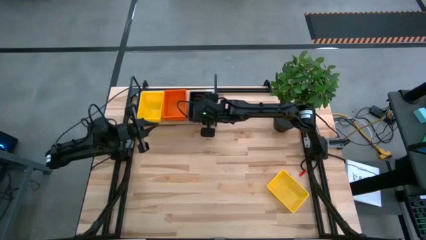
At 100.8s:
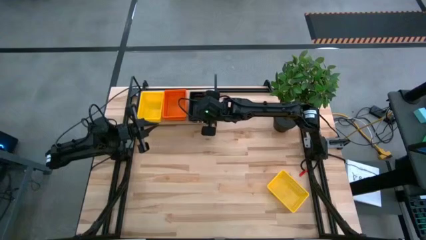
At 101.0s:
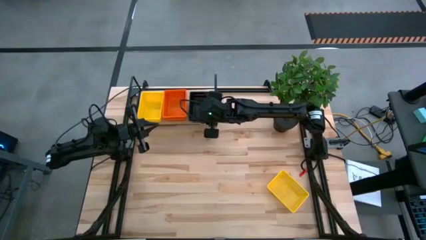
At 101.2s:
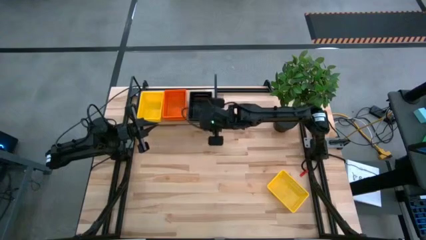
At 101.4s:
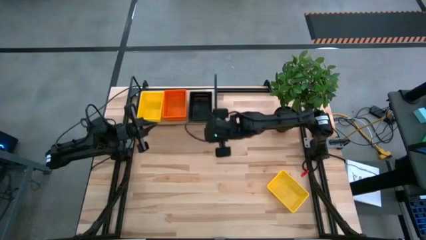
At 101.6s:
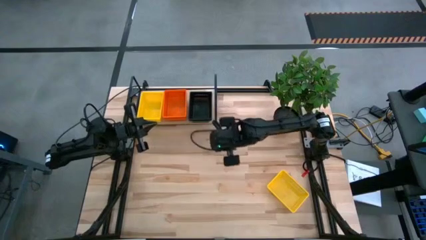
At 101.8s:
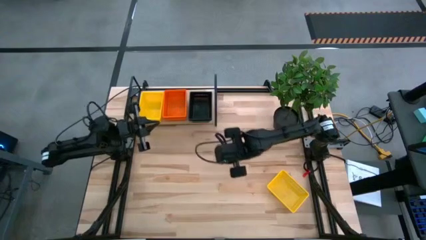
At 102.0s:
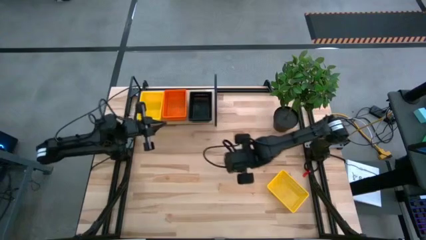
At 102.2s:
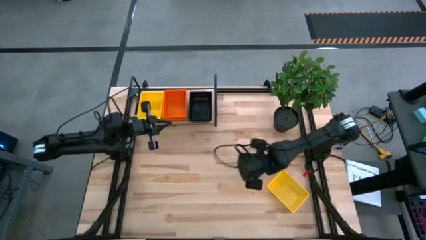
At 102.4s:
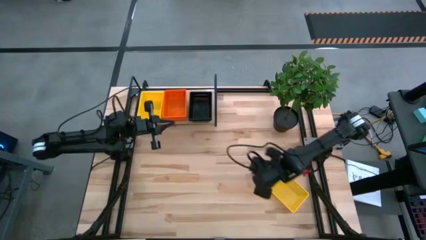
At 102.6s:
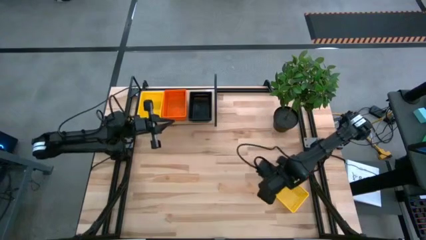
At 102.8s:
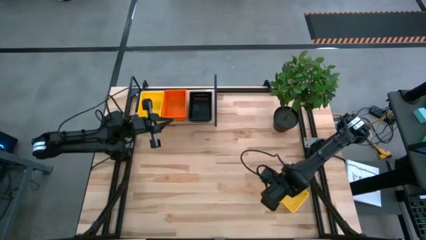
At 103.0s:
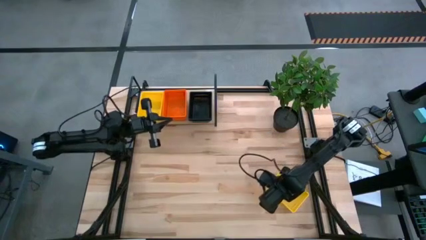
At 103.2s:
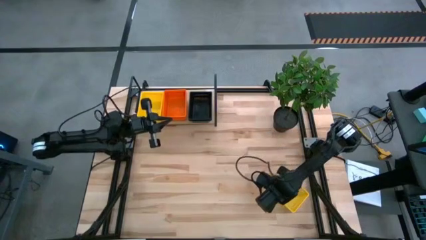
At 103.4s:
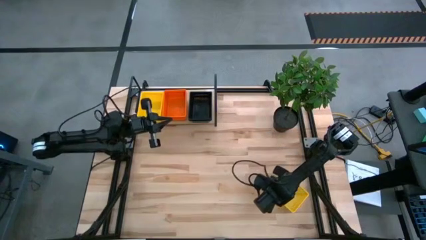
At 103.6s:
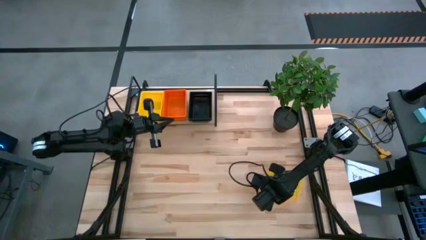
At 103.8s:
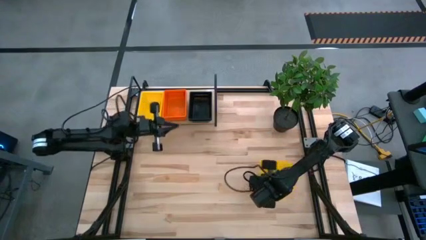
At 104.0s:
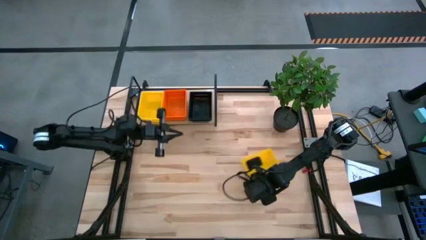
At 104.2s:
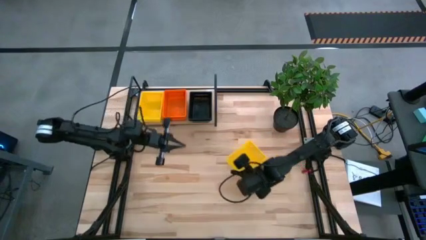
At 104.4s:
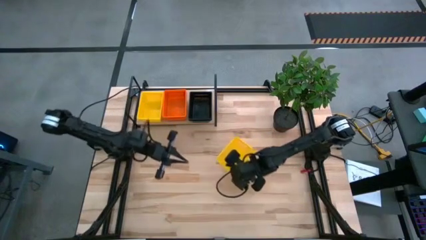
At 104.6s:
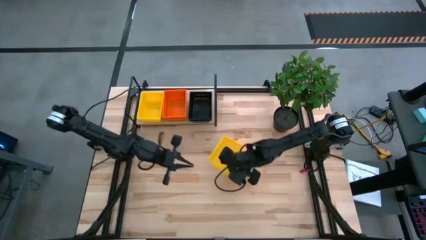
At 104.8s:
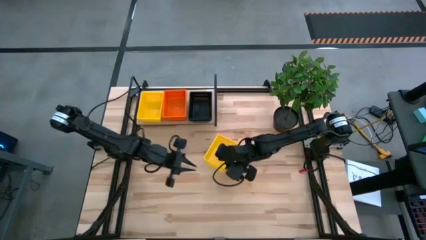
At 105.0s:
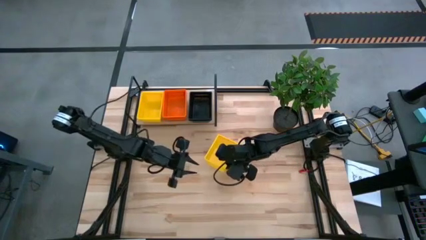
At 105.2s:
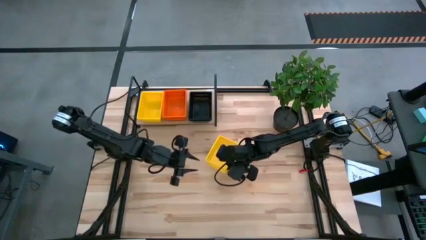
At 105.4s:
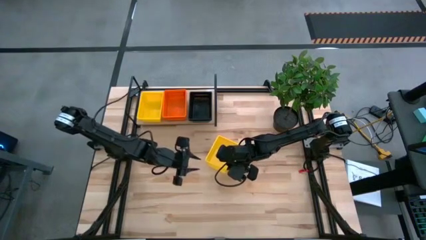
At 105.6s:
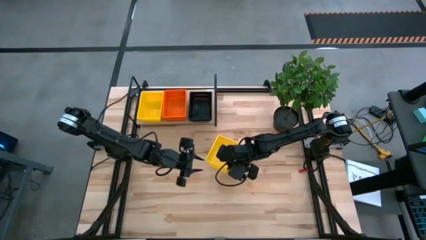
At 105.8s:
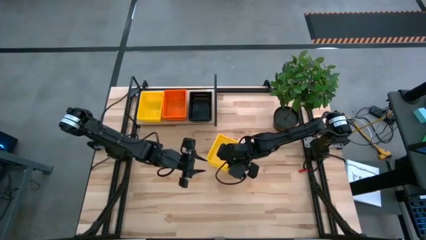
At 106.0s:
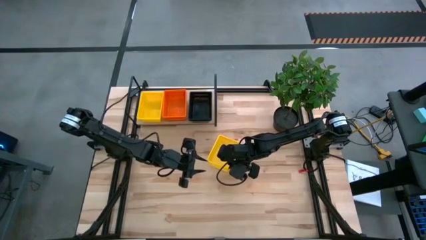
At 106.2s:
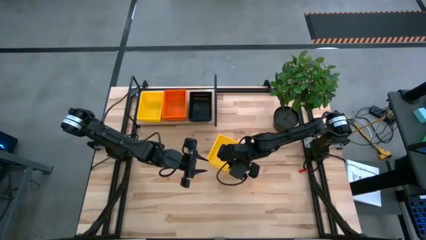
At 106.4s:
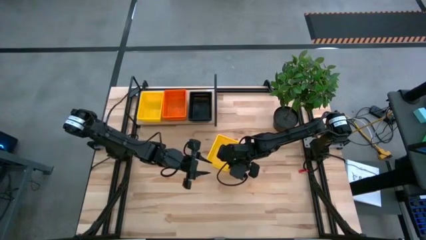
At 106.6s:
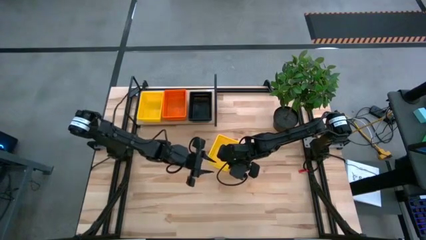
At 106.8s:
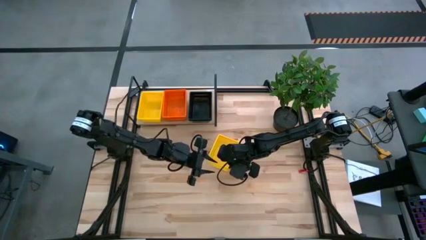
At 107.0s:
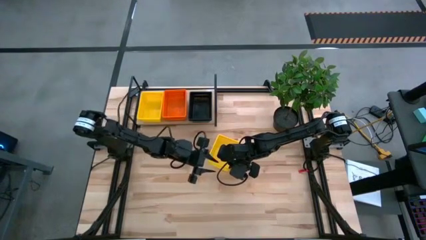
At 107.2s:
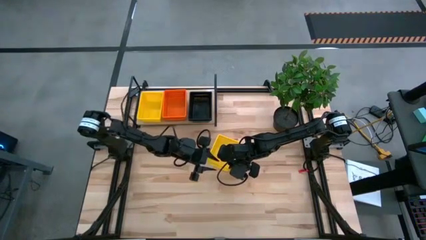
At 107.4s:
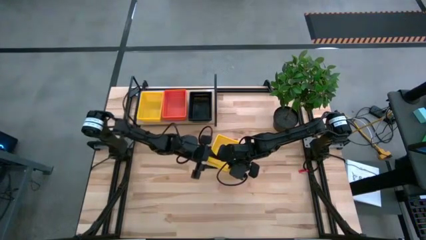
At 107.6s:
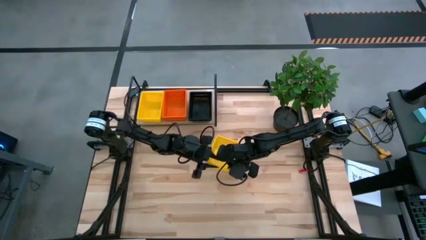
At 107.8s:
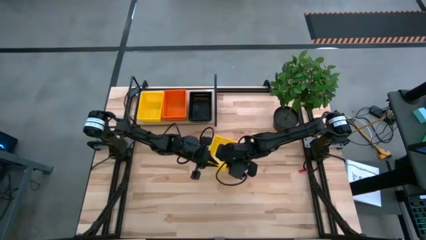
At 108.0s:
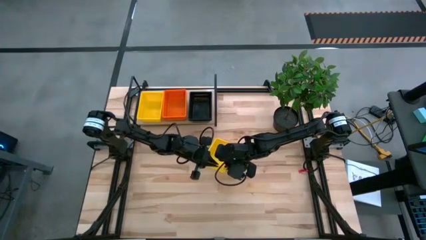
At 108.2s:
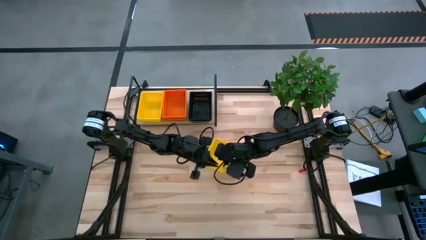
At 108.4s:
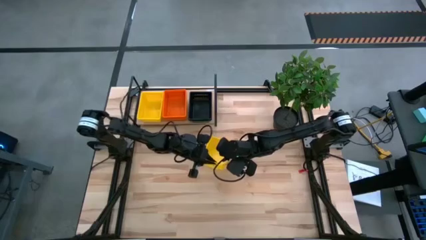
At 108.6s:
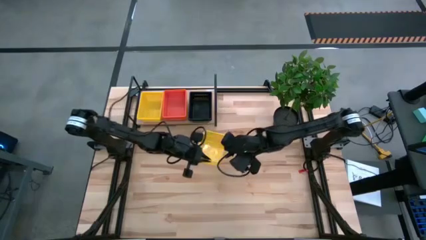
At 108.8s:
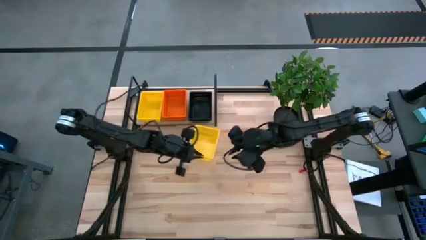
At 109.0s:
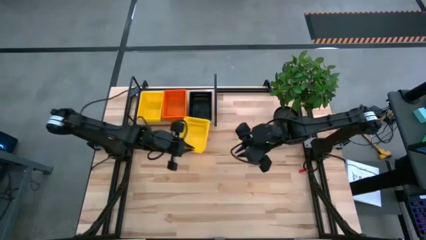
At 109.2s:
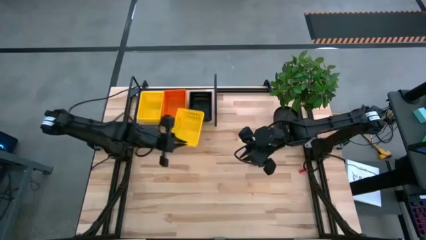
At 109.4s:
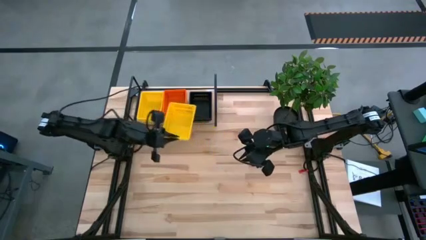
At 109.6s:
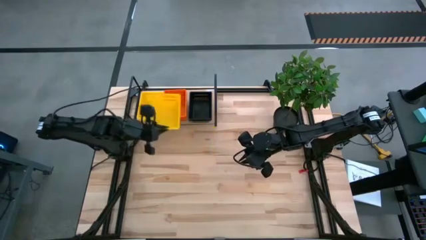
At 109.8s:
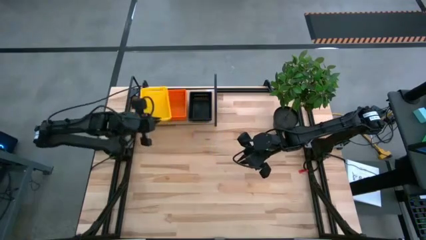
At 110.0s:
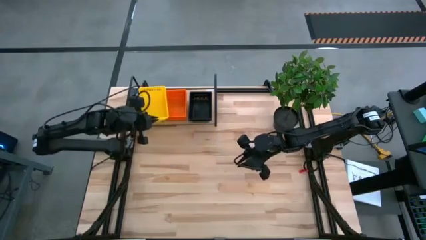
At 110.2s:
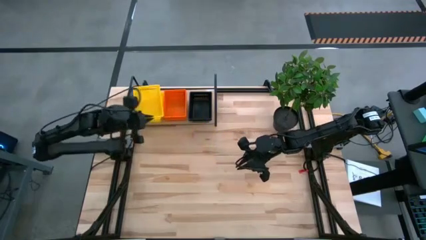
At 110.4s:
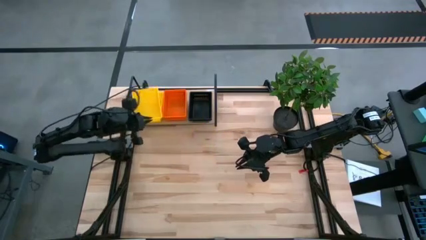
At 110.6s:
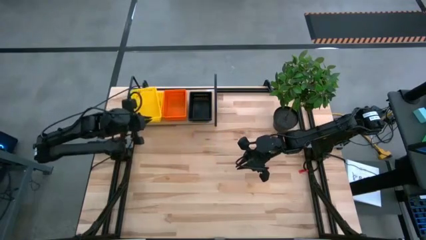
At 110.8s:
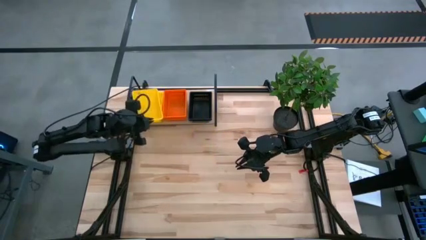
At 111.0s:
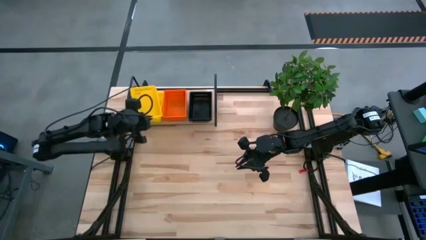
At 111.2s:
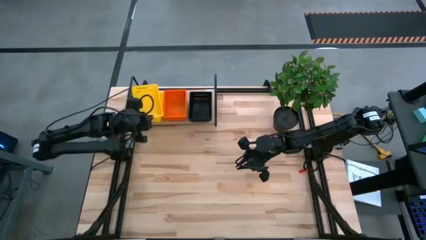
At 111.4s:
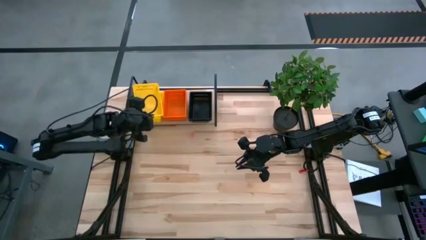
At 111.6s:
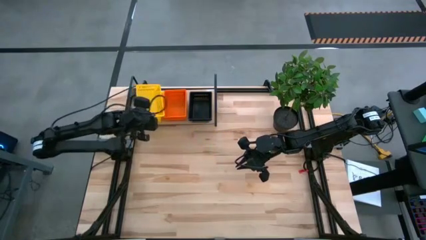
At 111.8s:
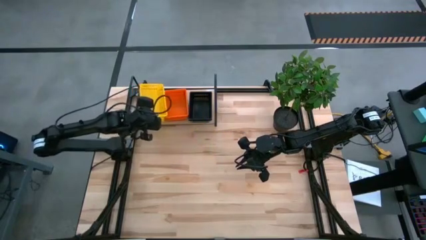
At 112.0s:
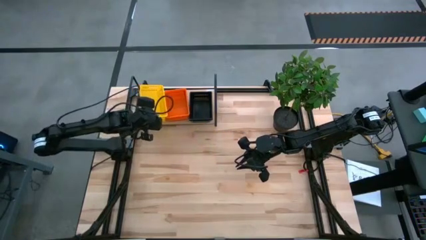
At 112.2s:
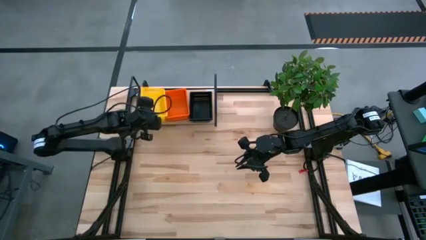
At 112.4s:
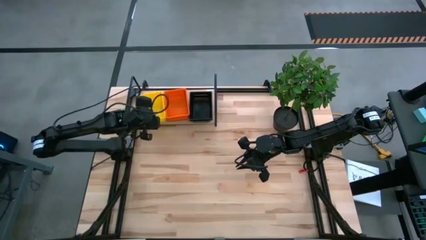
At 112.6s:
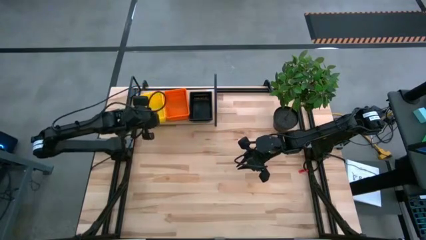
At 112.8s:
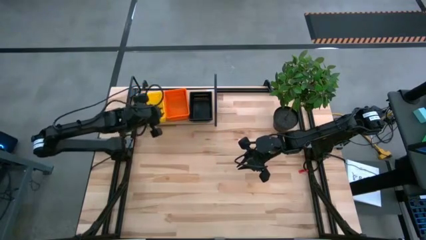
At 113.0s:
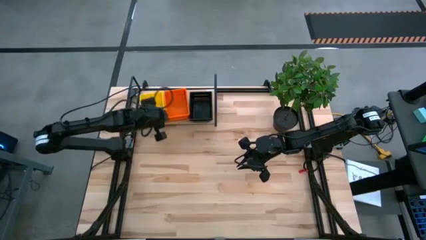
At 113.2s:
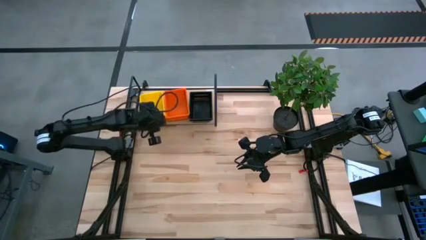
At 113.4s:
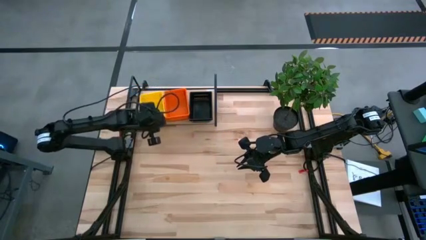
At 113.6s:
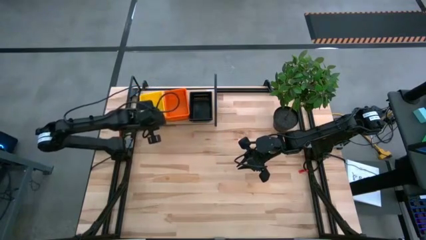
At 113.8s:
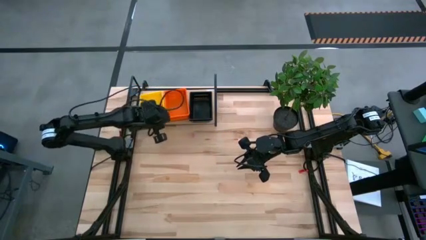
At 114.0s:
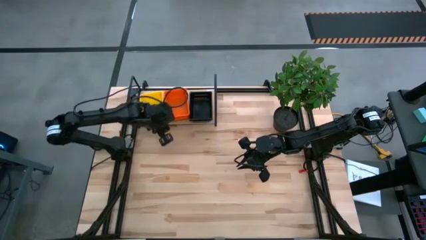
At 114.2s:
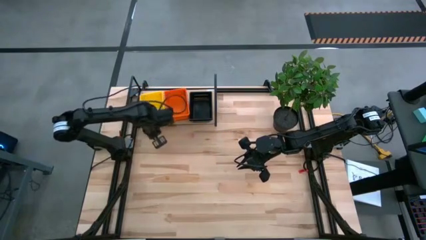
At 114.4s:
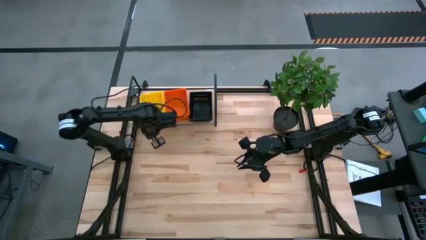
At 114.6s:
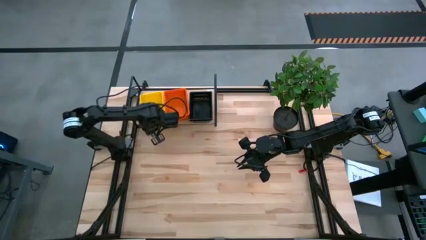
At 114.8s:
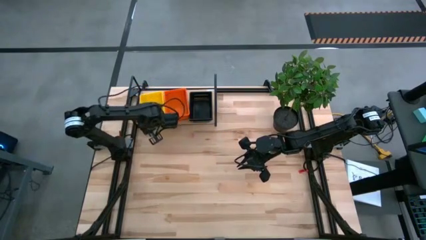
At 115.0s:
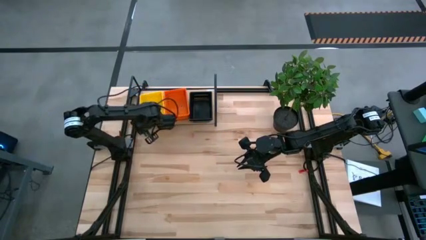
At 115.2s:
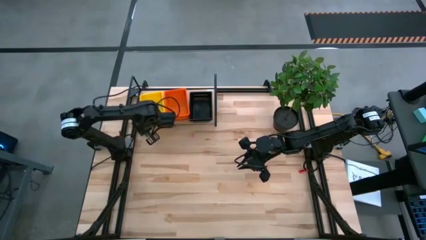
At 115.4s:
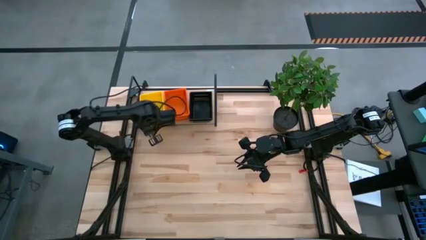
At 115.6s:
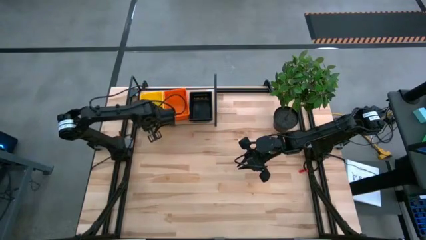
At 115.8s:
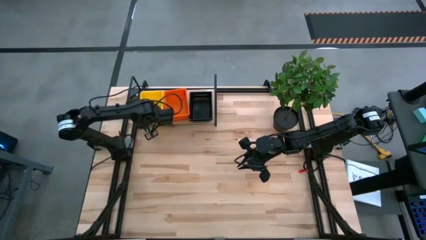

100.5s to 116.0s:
Task: Stack baskets on shelf by color
Stack the yellow bin on the yellow bin on the shelf

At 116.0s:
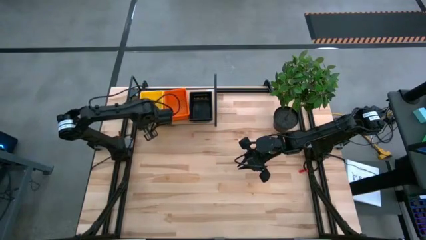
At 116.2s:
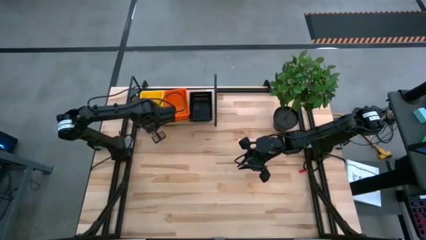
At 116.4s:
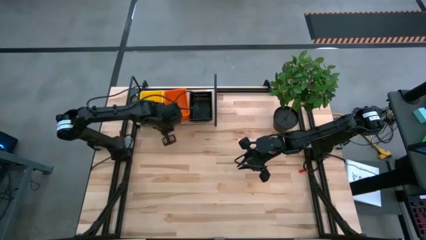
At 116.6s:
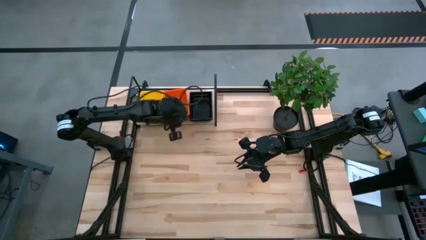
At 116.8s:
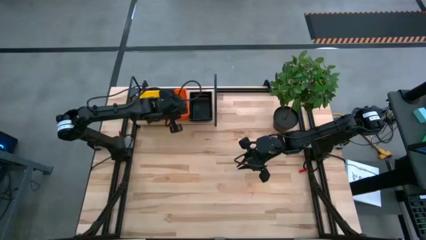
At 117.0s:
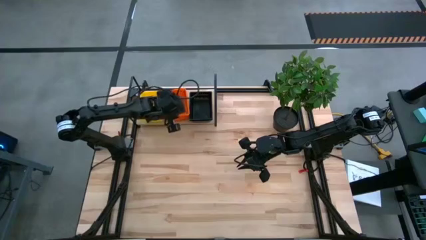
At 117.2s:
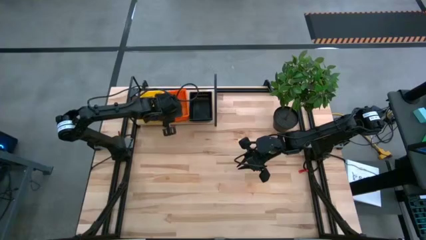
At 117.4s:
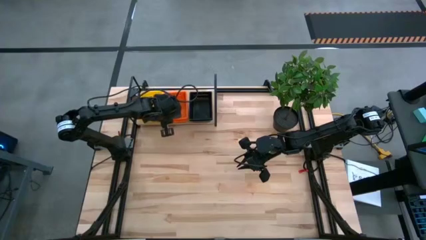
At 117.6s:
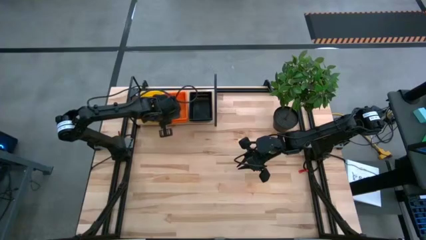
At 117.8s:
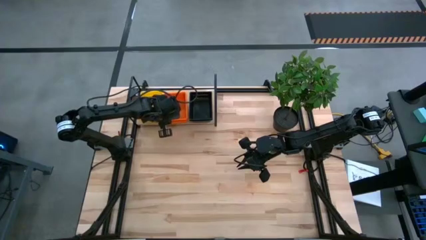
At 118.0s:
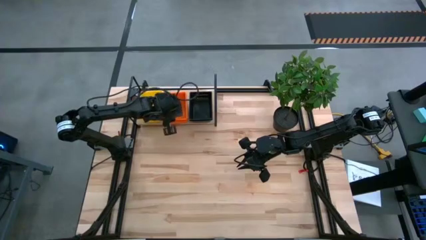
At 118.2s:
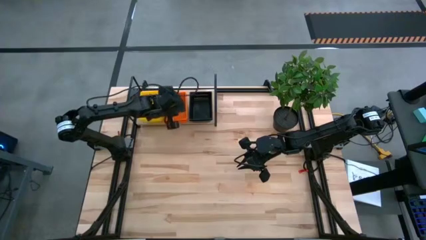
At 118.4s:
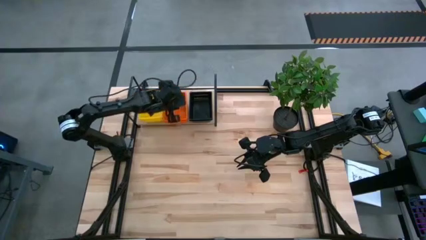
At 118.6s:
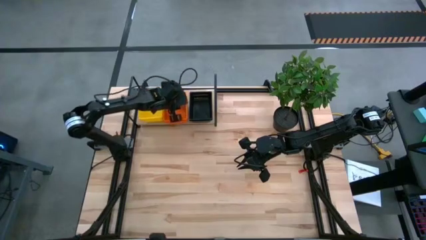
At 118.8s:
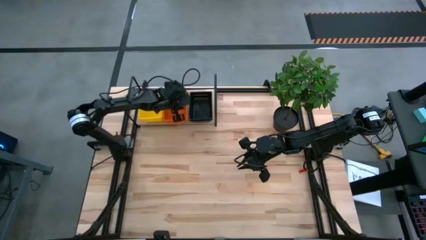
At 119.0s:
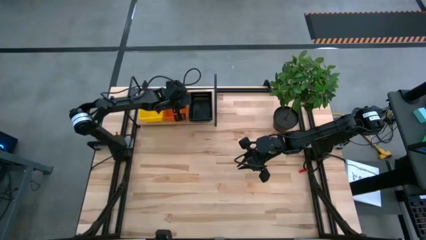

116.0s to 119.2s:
Adjust the orange bins on the shelf
